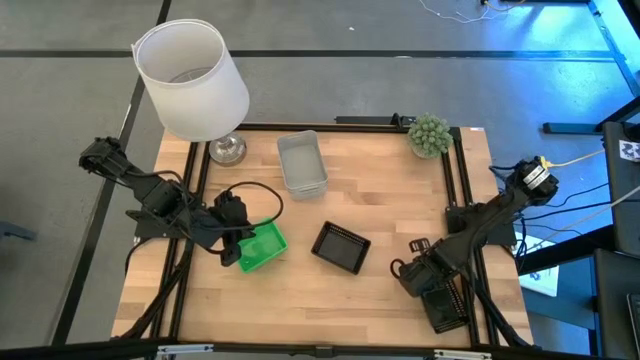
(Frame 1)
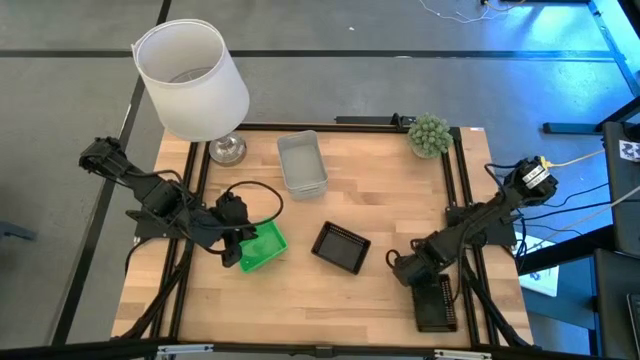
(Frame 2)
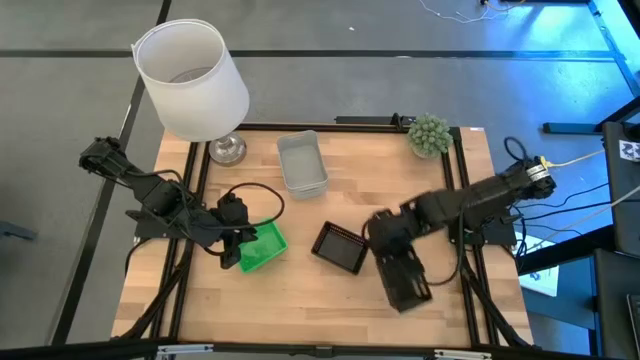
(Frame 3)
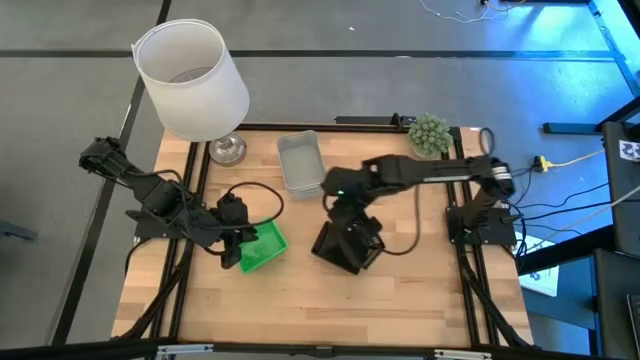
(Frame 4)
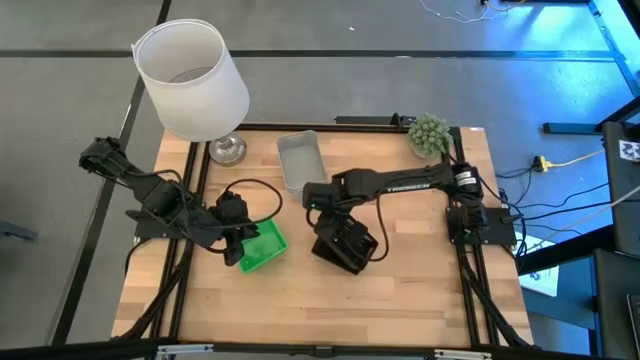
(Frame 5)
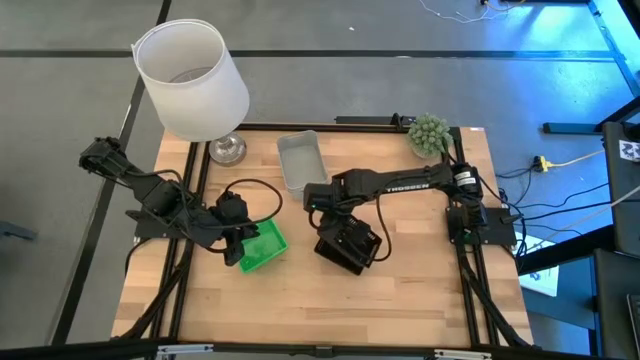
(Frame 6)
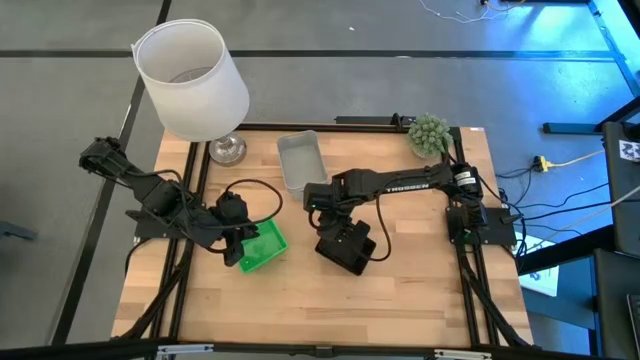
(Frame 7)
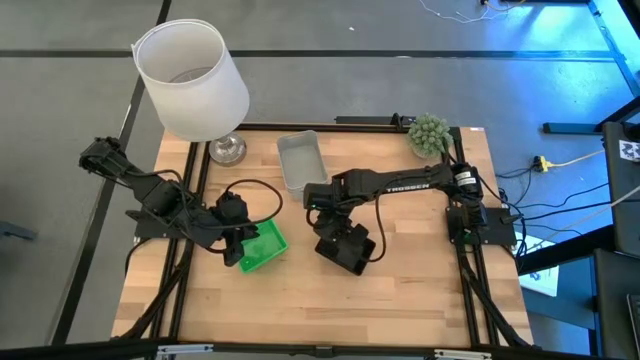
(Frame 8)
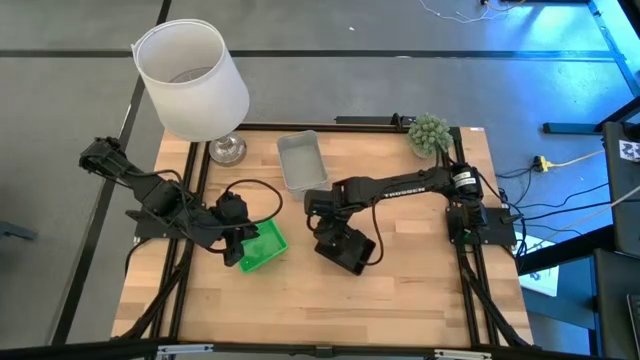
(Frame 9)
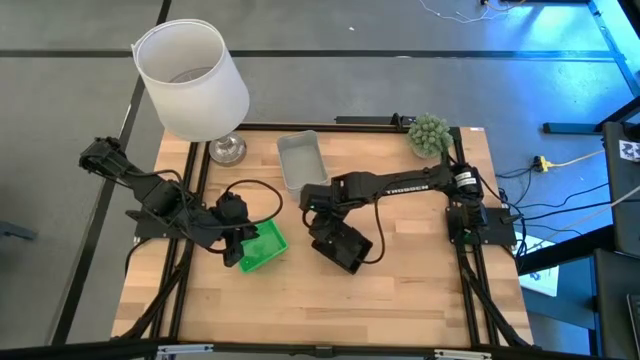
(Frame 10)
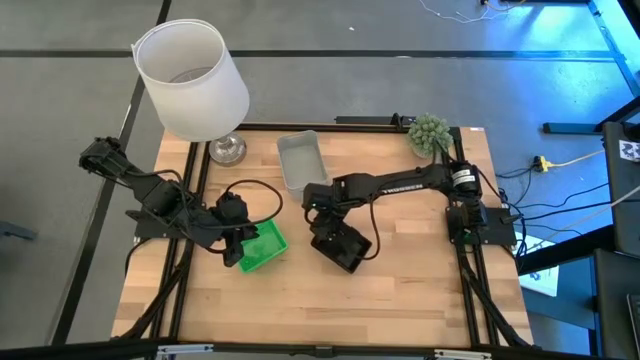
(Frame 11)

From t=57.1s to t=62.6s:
Stack the right black bin on the top black bins

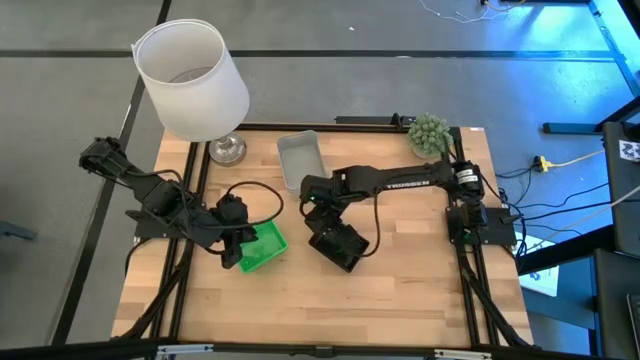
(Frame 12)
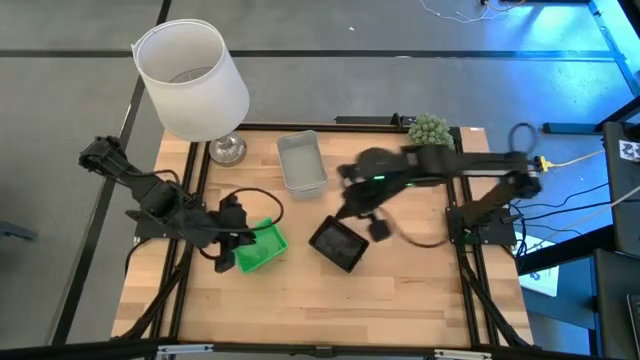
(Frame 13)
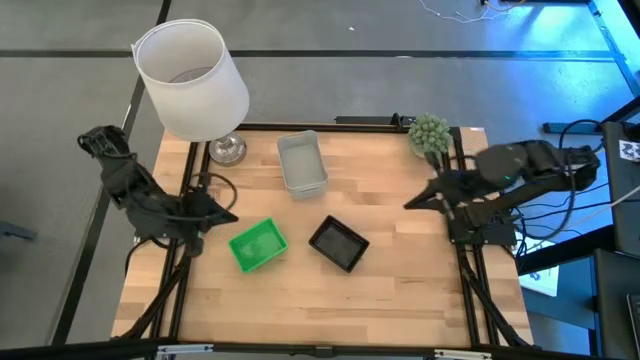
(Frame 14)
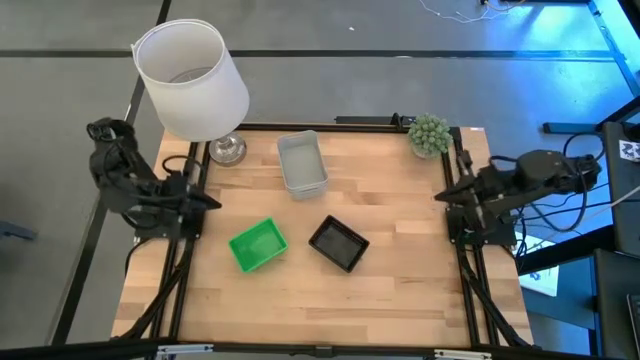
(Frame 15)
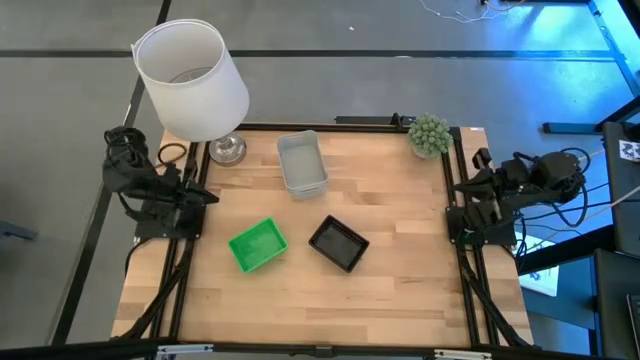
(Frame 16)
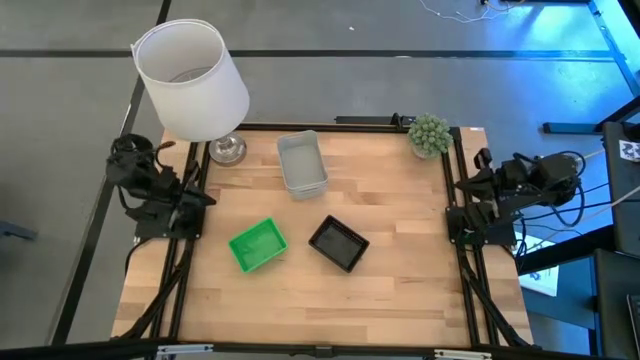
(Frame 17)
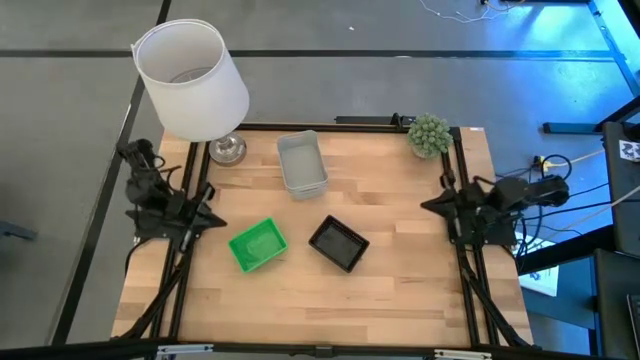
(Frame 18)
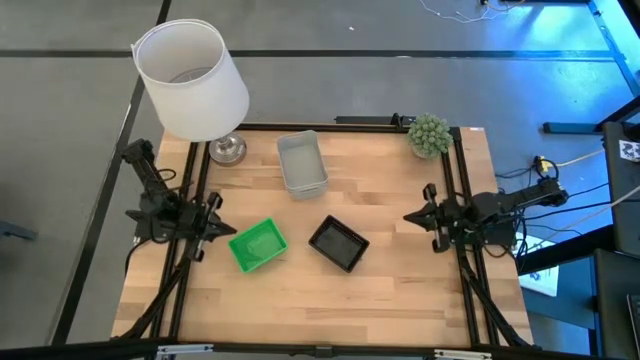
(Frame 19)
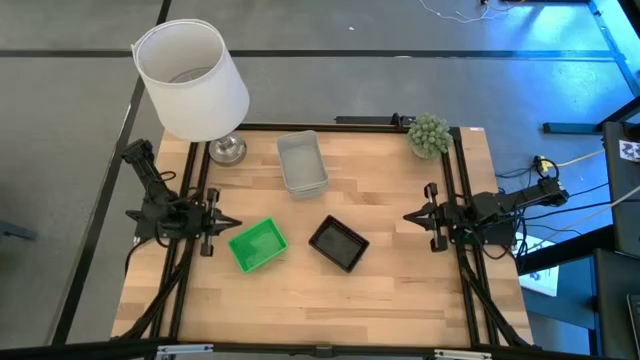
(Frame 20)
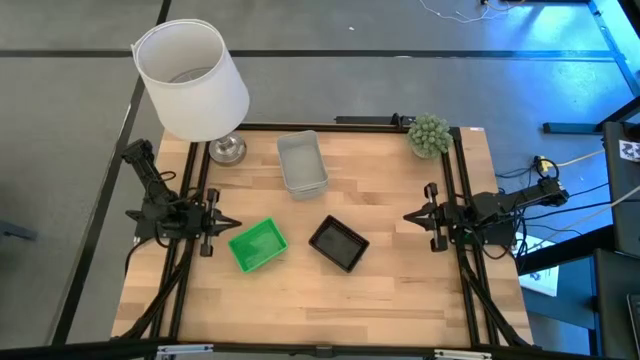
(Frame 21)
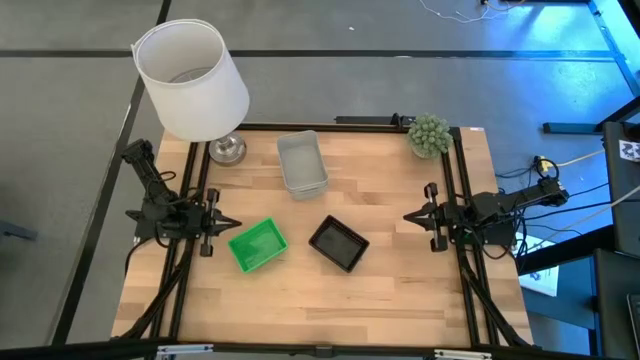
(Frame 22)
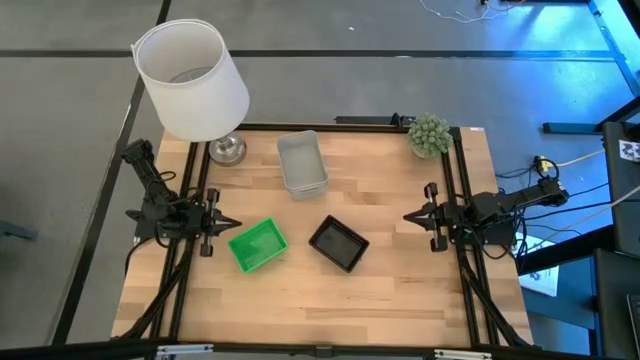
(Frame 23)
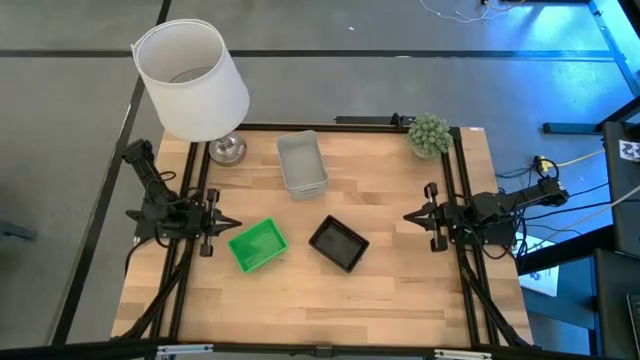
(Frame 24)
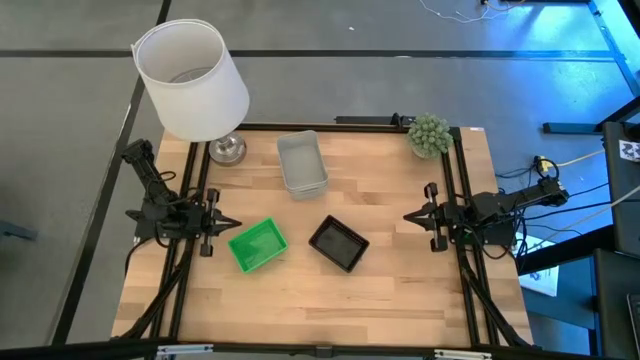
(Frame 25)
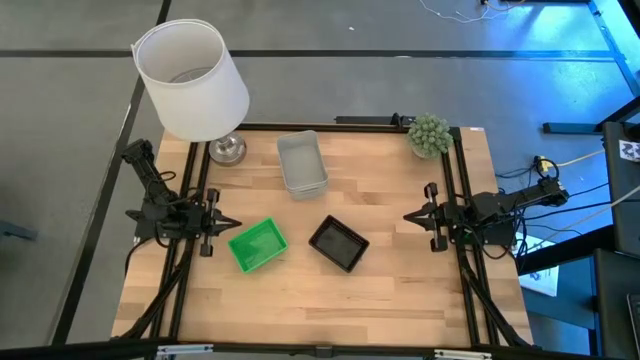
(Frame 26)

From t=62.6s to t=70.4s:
Return to Home Position
